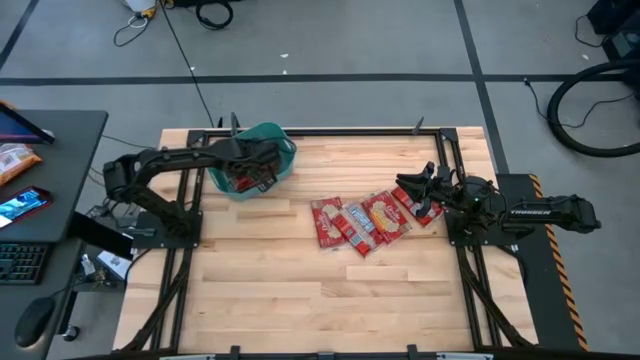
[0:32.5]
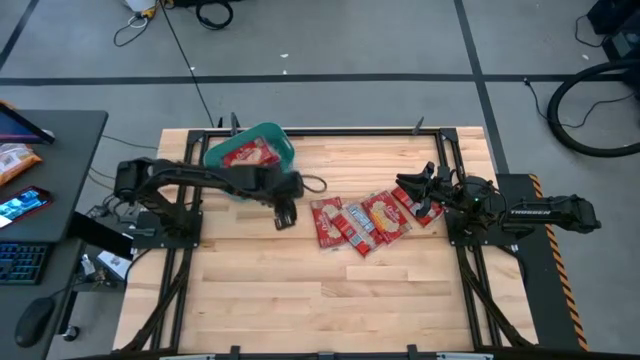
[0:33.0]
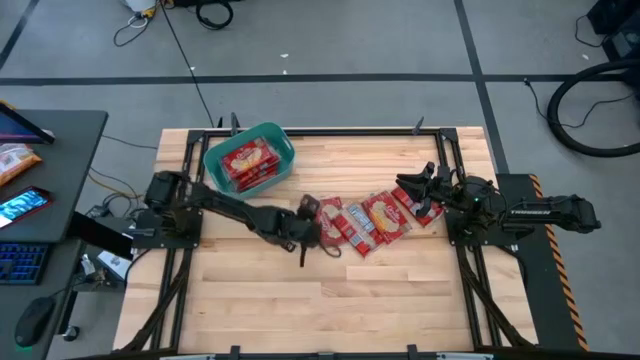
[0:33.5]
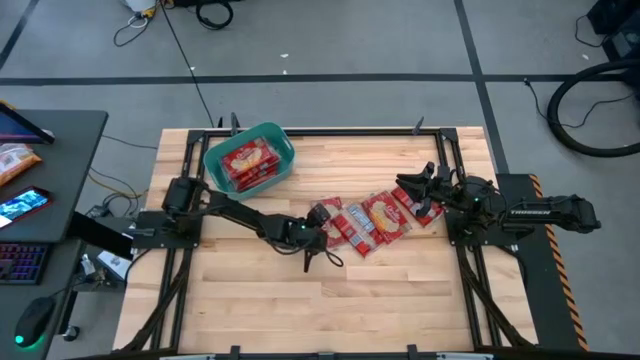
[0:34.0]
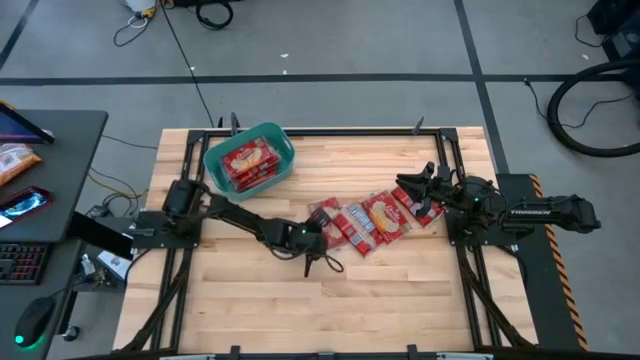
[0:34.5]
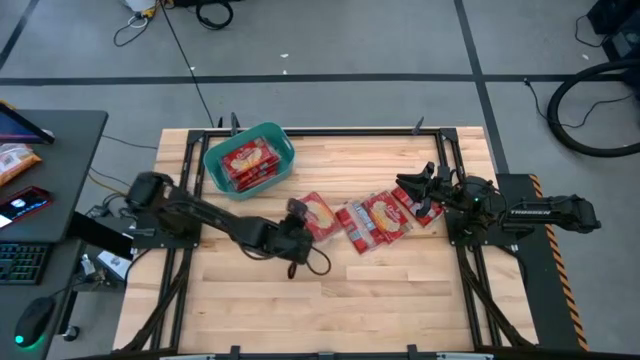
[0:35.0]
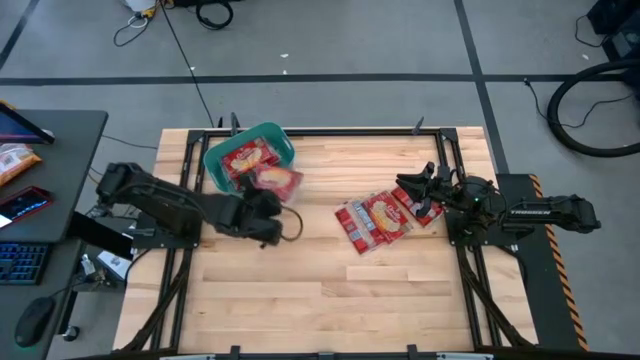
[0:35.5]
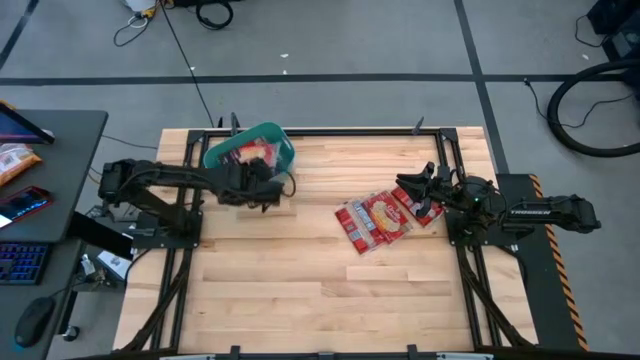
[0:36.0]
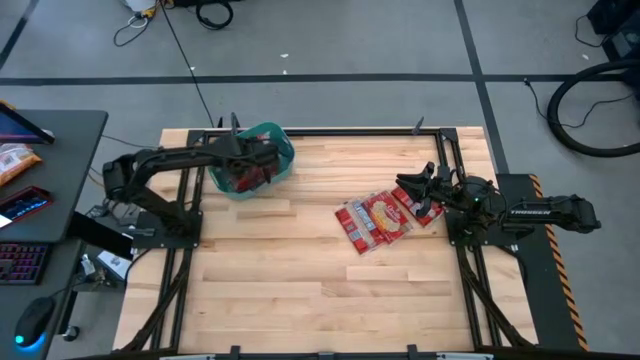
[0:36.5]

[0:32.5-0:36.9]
Task: Sort popcorn bags into baskets
Put the popcorn bag into the green bin

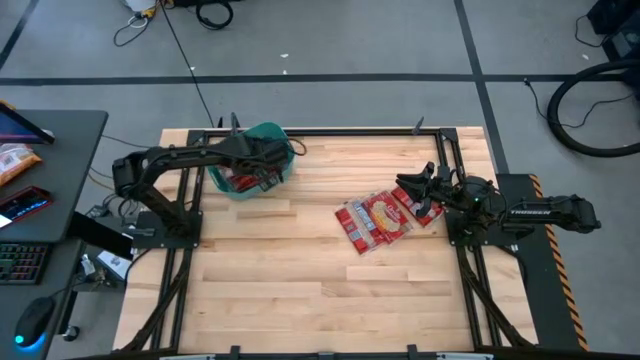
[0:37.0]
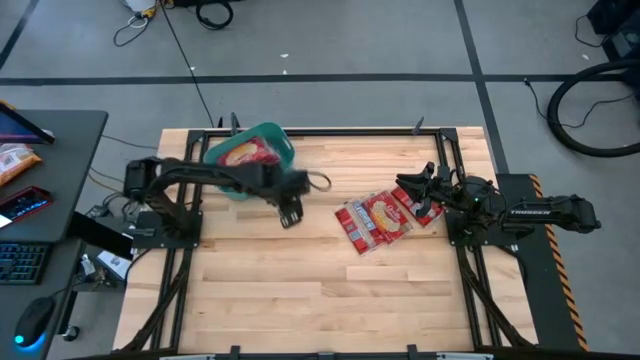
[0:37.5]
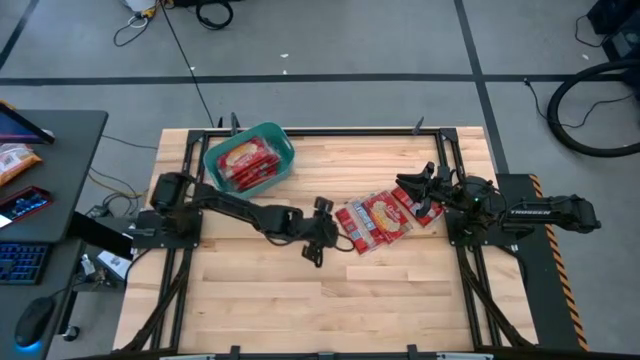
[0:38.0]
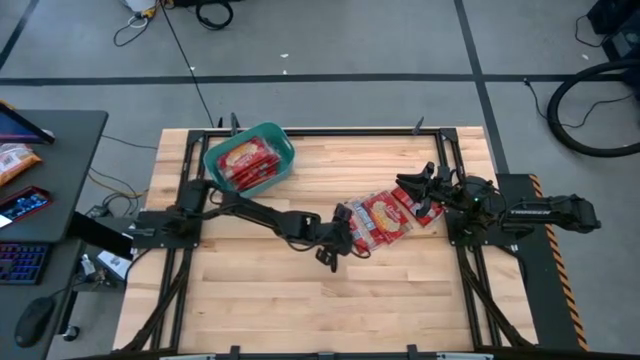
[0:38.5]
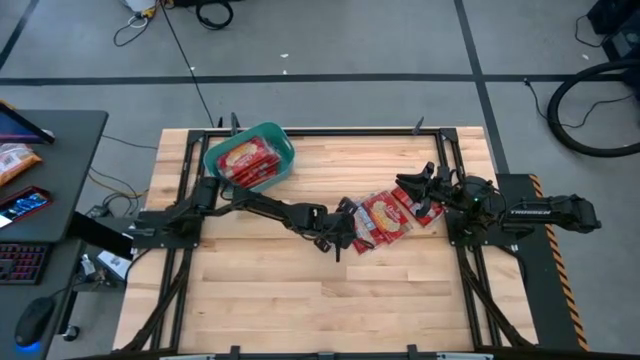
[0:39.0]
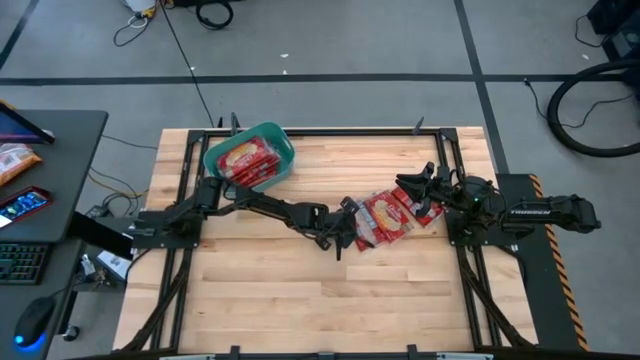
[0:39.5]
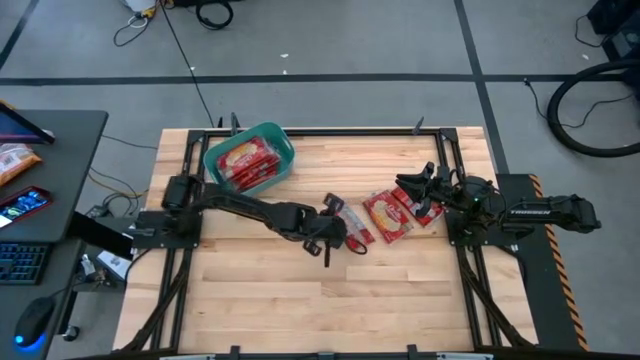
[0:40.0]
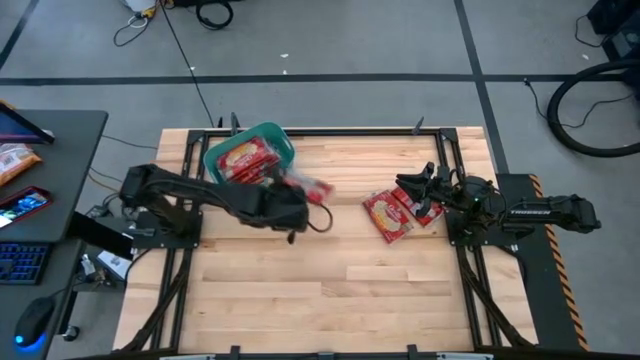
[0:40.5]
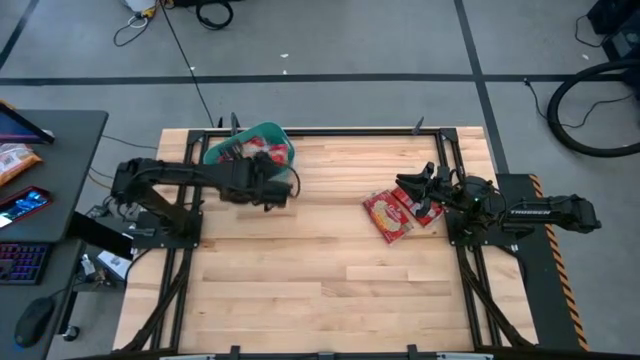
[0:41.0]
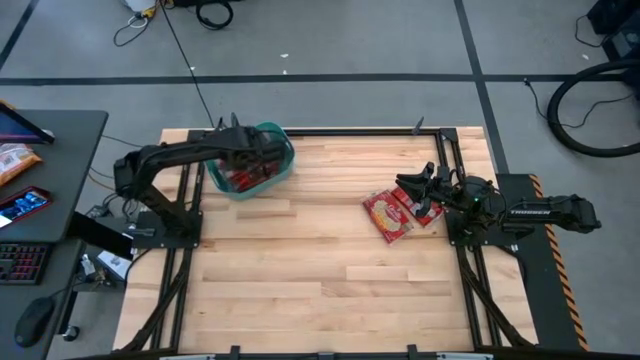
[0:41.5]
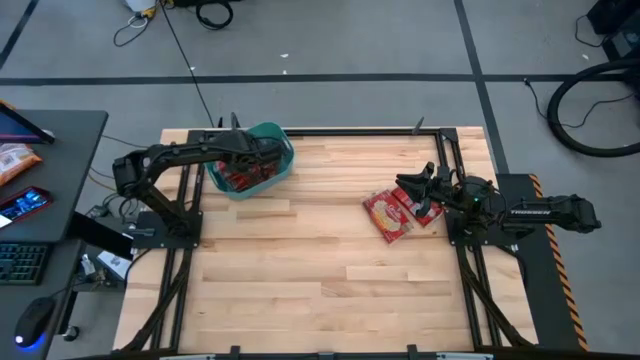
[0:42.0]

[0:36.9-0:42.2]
Put the popcorn bag into the green bin

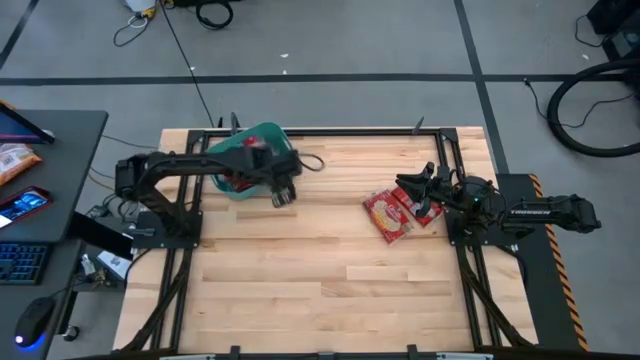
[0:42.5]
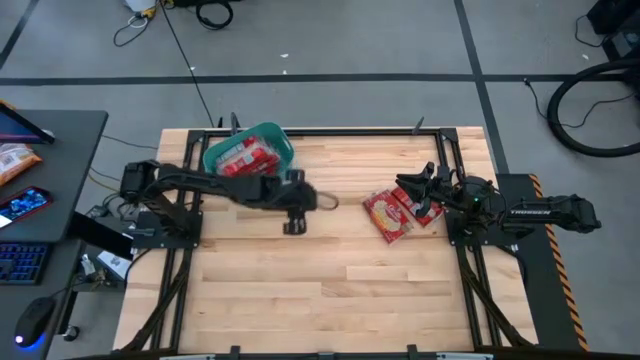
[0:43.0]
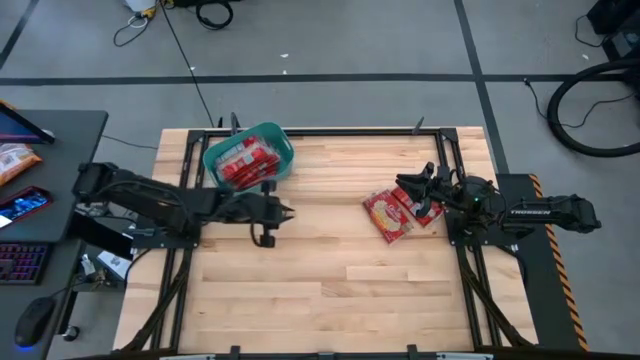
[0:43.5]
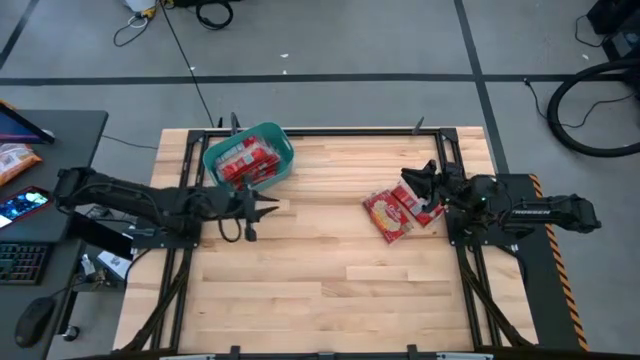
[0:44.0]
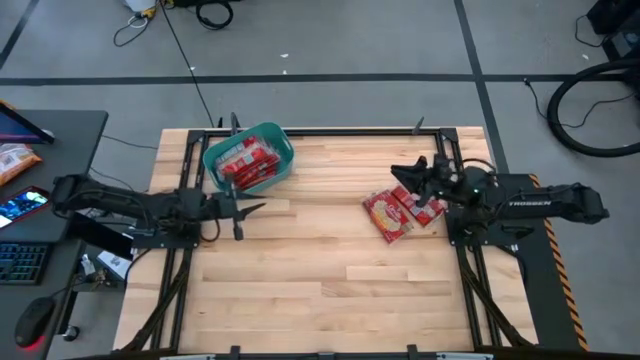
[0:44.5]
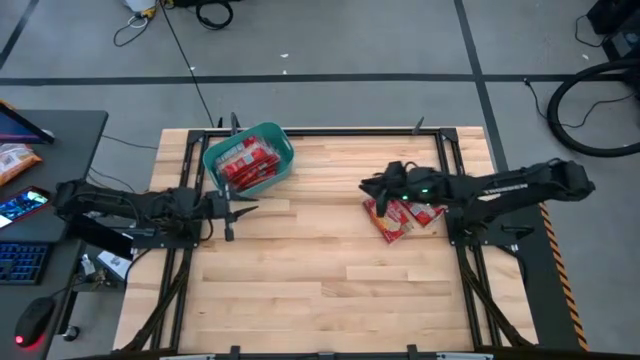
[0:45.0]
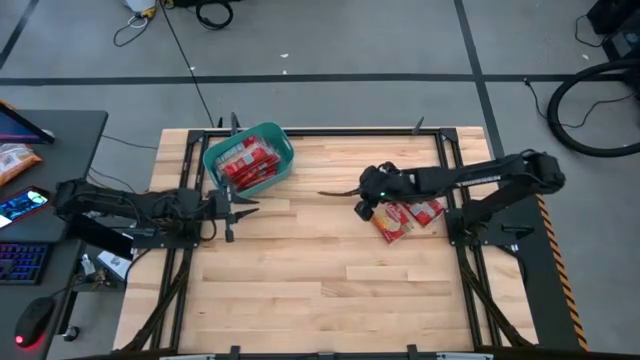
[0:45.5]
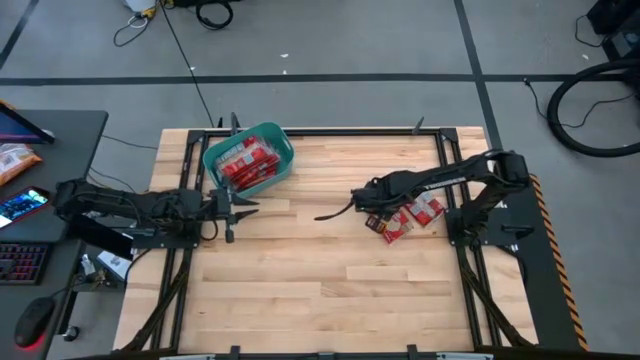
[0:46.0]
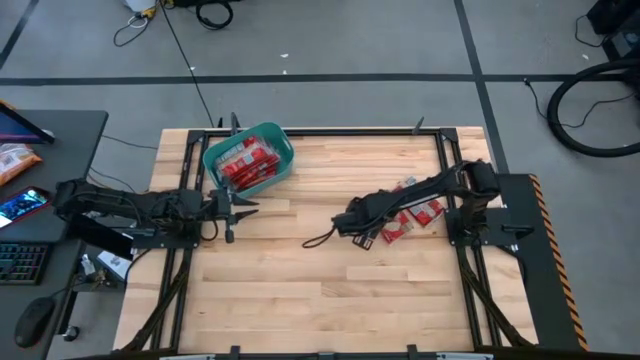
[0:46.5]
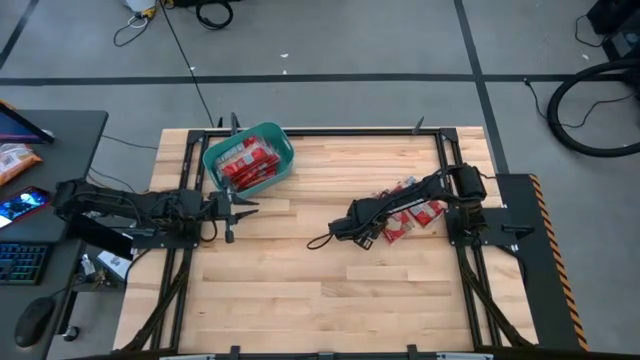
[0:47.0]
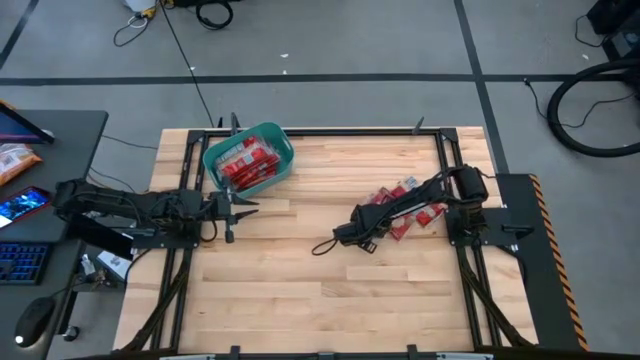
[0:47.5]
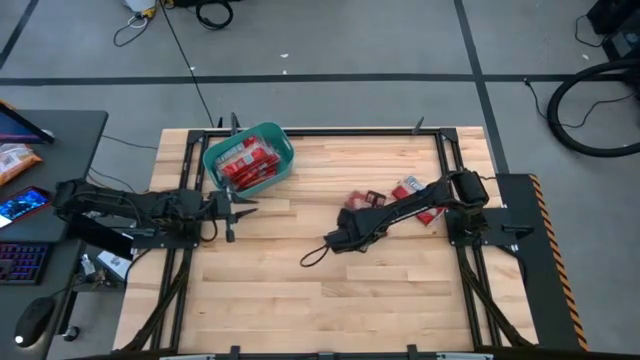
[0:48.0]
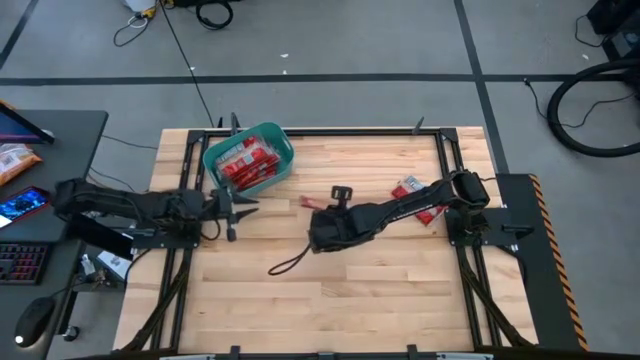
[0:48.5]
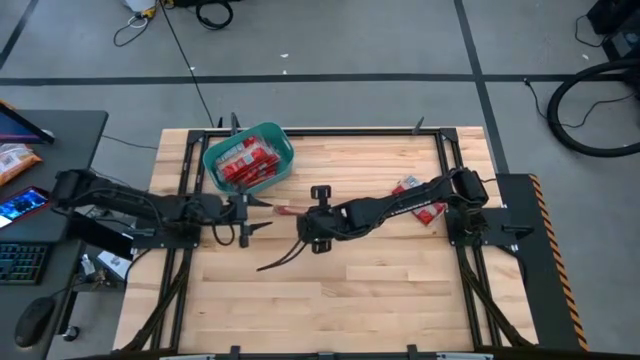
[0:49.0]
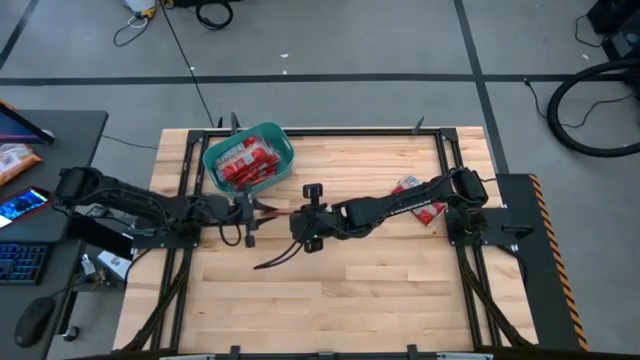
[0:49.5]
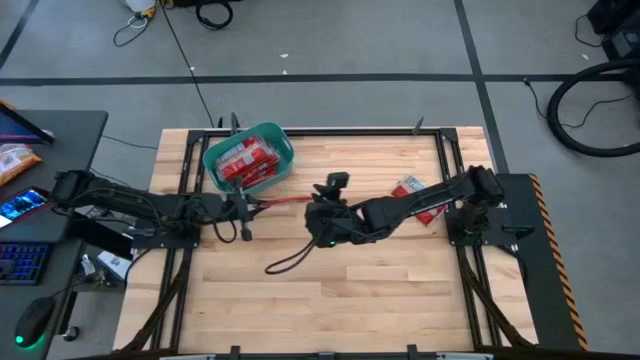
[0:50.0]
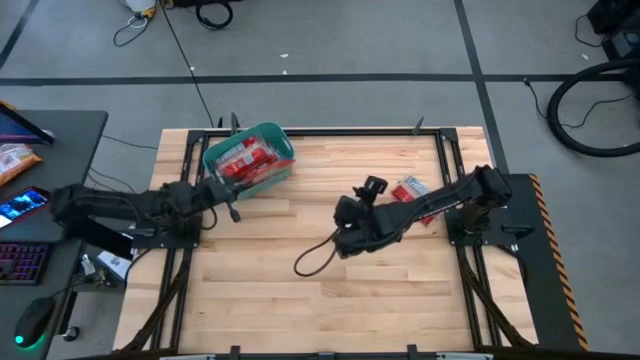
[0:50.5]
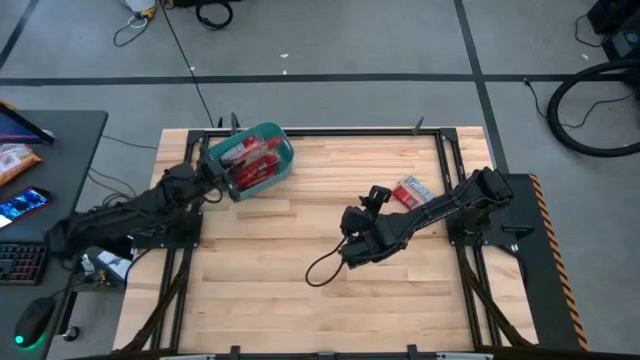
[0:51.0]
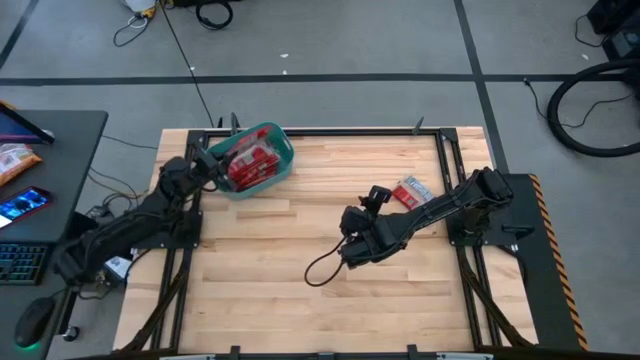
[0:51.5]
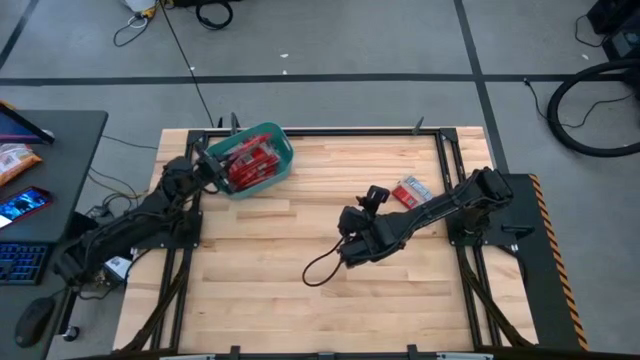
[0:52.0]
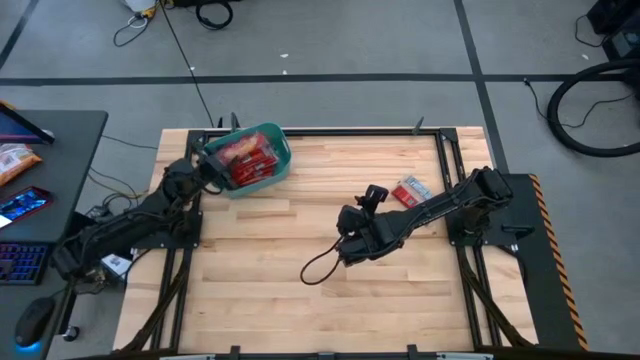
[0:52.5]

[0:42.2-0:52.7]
Put the popcorn bag into the green bin

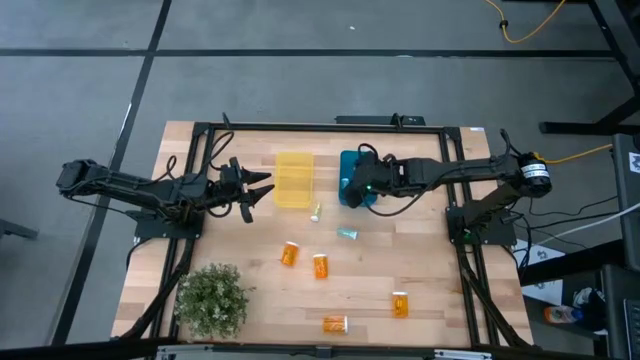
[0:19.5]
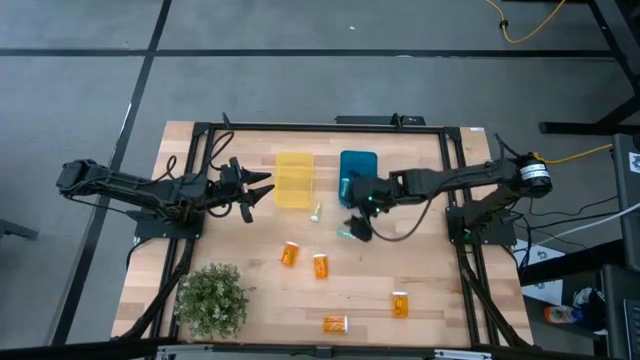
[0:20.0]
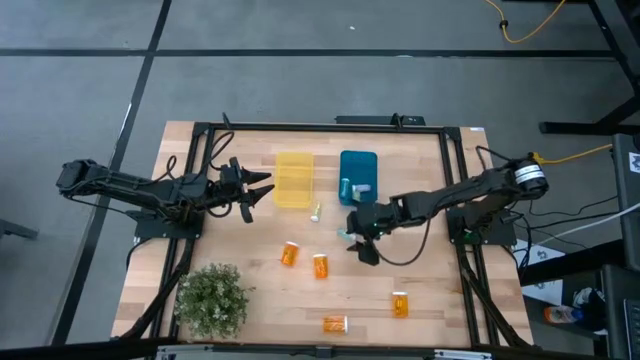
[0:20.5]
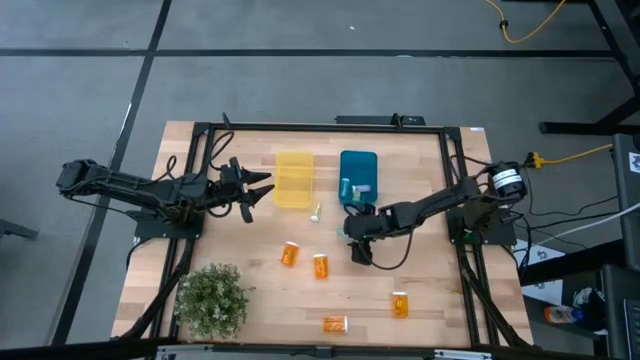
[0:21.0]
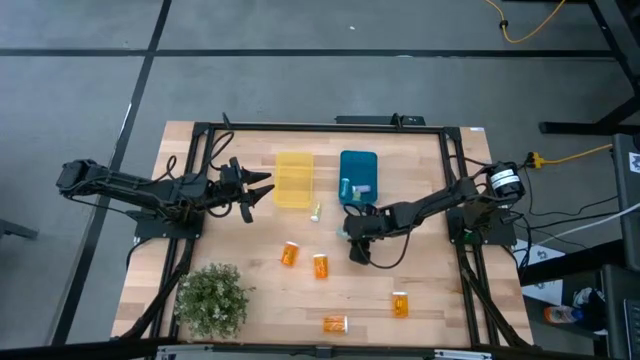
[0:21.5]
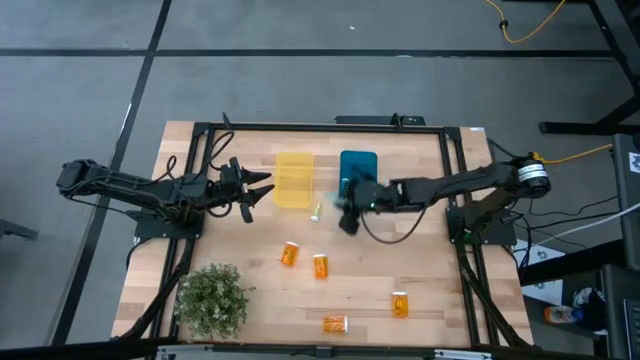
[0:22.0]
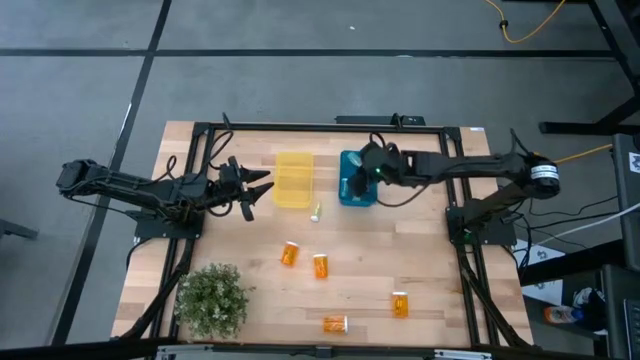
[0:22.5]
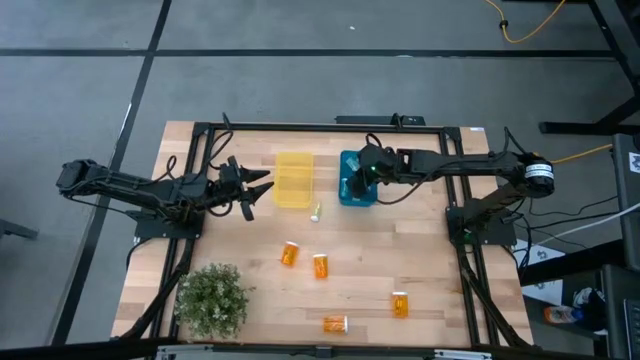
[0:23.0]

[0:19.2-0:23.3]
Task: Pick and place medicine bottles into bin by pill shape (circle, oval)
Put the blue pill bottle into the blue bin
